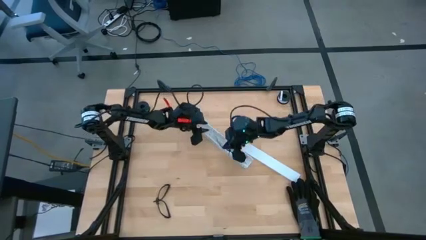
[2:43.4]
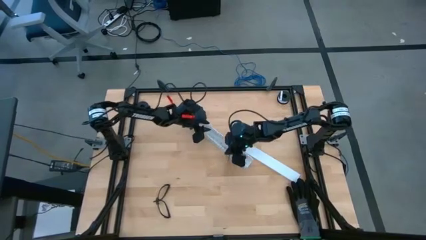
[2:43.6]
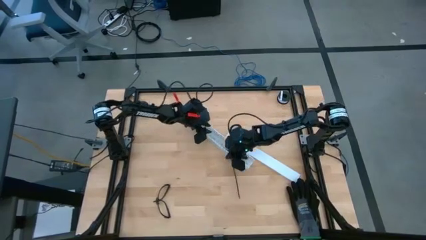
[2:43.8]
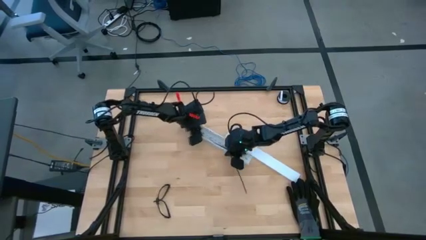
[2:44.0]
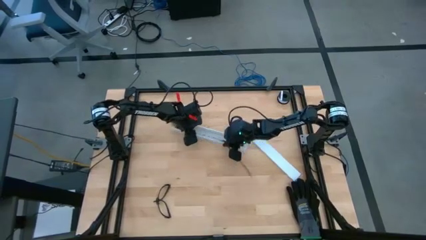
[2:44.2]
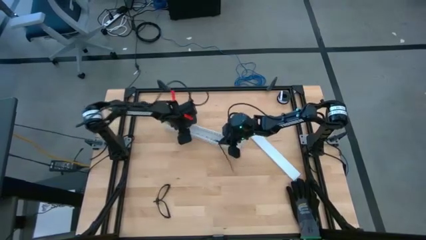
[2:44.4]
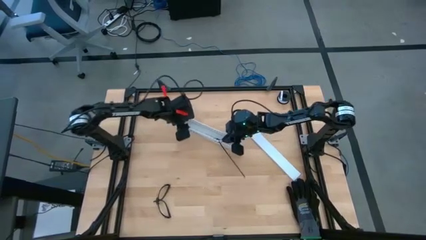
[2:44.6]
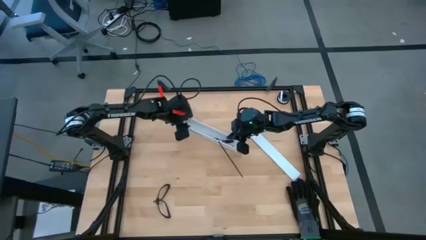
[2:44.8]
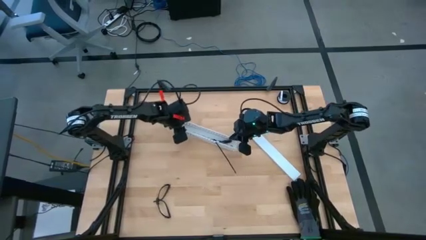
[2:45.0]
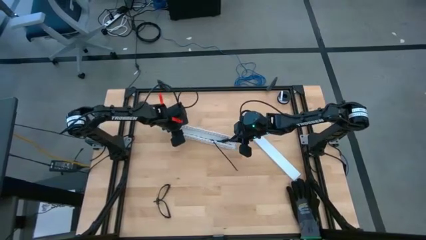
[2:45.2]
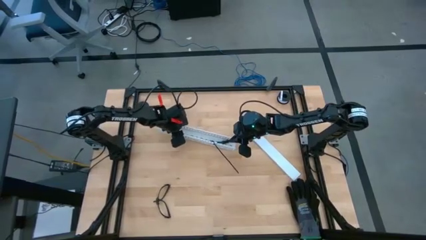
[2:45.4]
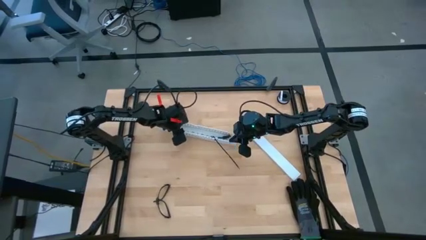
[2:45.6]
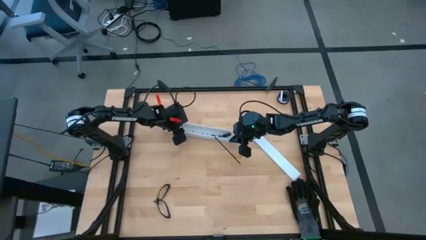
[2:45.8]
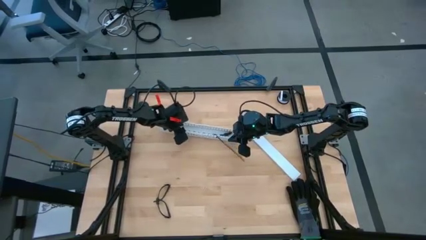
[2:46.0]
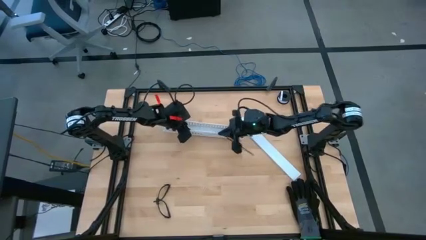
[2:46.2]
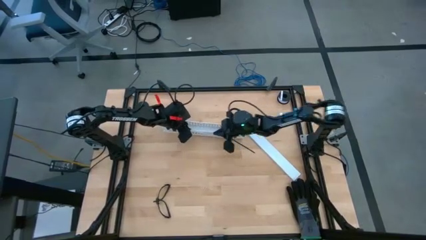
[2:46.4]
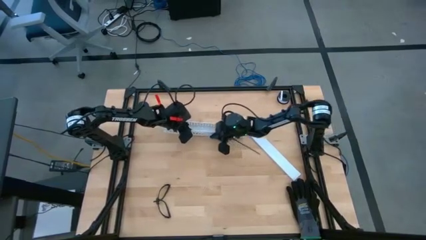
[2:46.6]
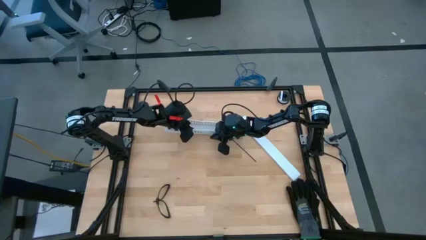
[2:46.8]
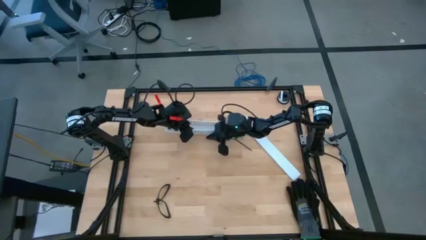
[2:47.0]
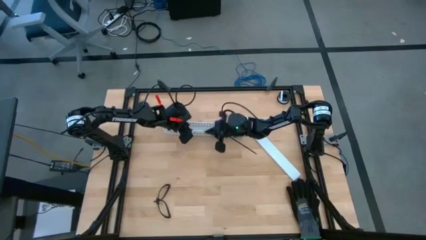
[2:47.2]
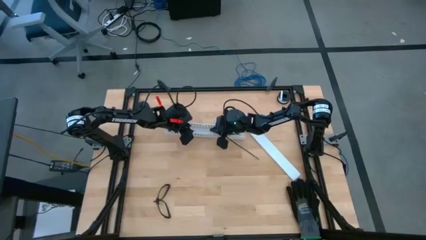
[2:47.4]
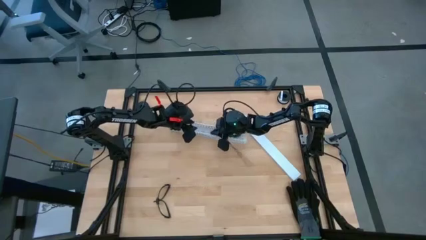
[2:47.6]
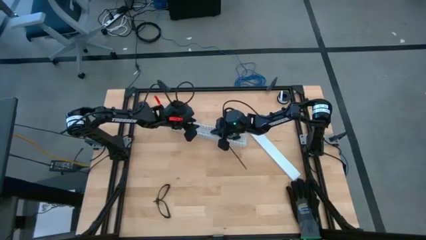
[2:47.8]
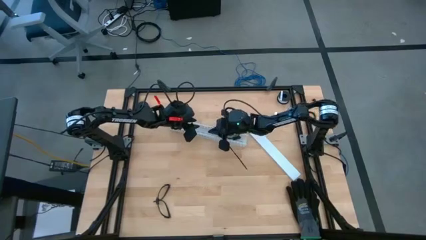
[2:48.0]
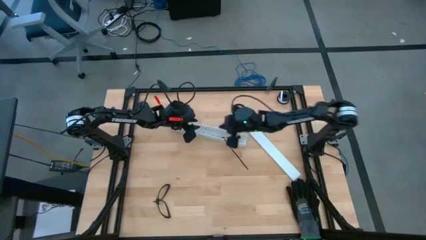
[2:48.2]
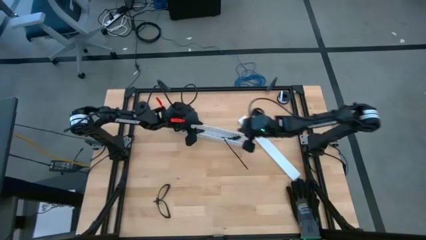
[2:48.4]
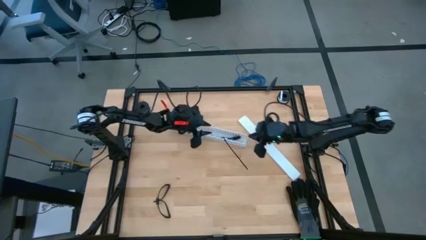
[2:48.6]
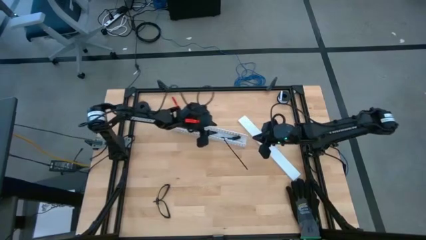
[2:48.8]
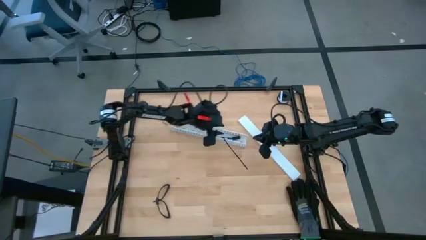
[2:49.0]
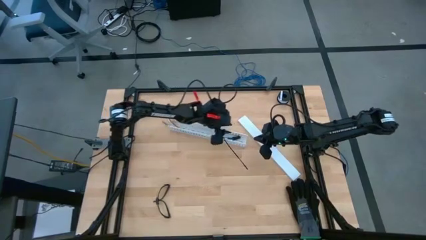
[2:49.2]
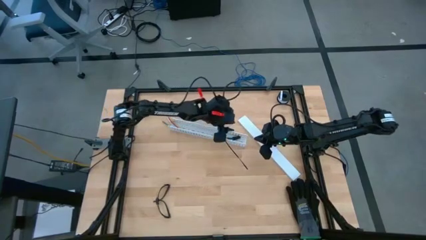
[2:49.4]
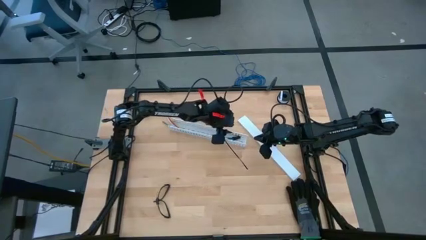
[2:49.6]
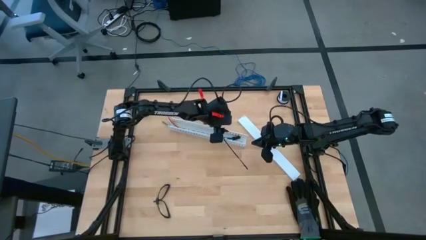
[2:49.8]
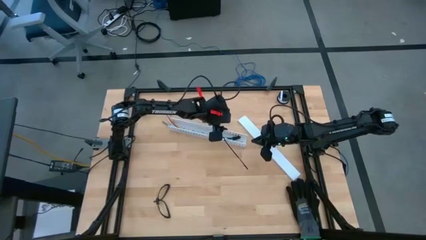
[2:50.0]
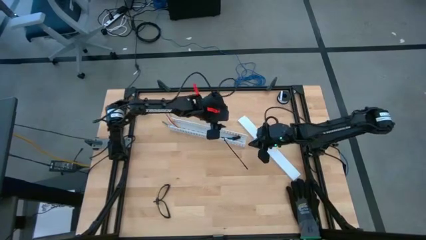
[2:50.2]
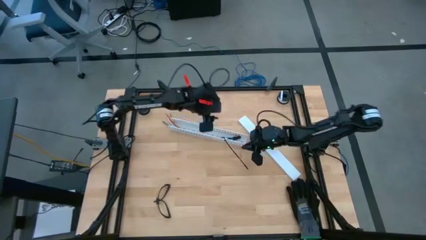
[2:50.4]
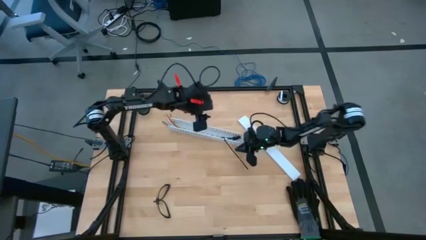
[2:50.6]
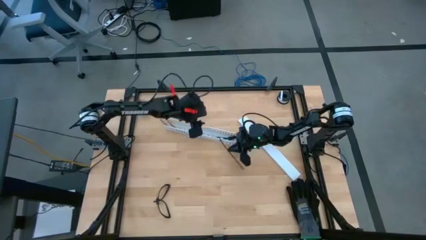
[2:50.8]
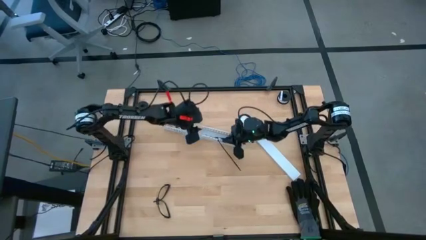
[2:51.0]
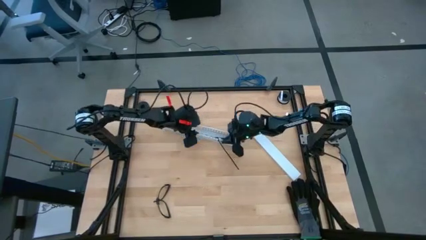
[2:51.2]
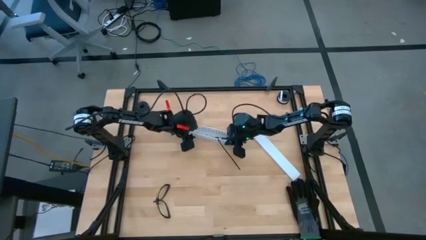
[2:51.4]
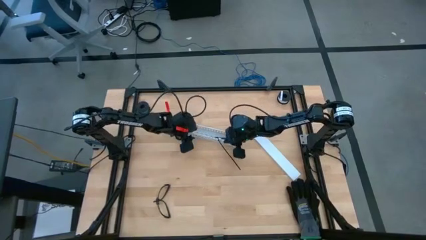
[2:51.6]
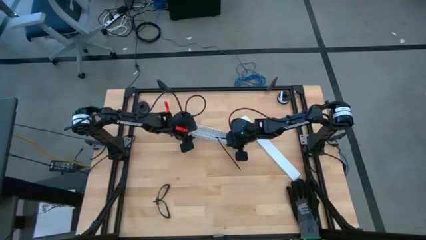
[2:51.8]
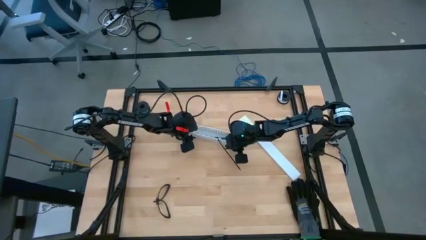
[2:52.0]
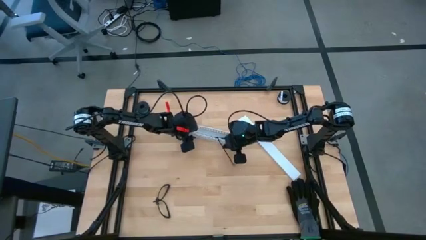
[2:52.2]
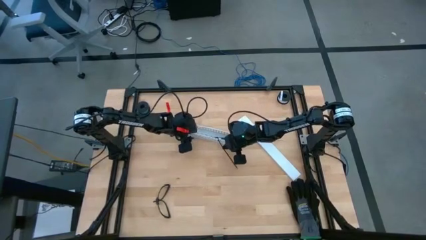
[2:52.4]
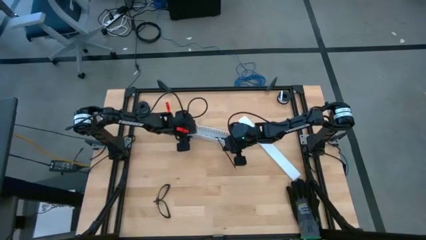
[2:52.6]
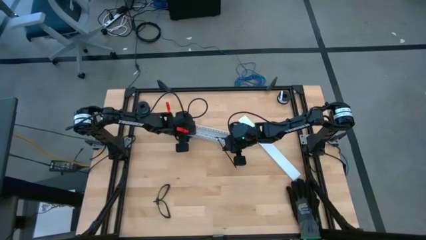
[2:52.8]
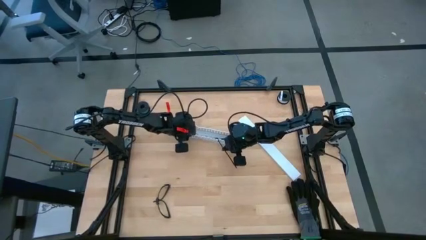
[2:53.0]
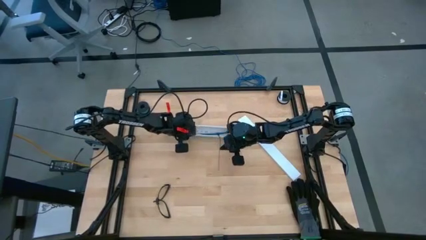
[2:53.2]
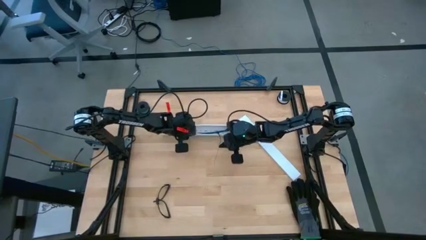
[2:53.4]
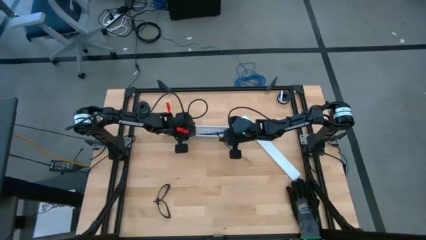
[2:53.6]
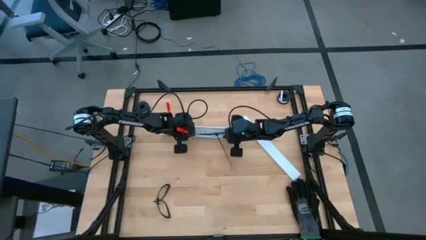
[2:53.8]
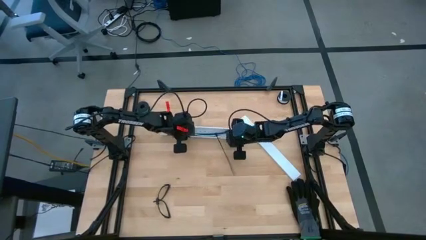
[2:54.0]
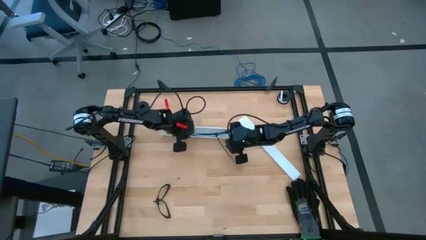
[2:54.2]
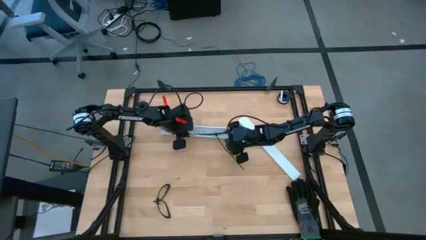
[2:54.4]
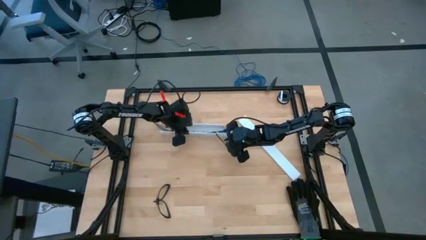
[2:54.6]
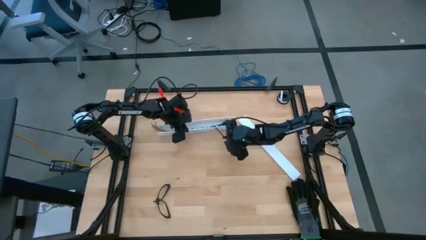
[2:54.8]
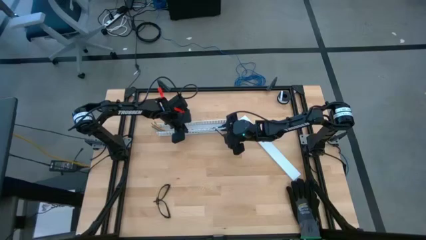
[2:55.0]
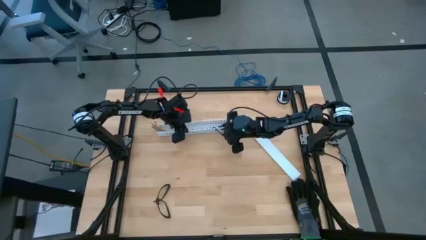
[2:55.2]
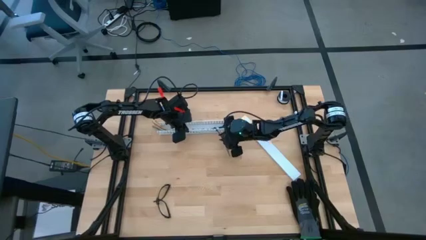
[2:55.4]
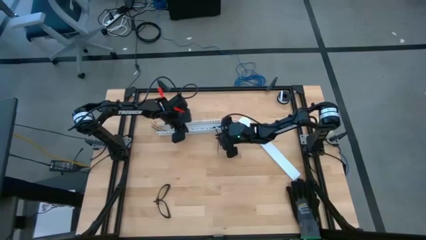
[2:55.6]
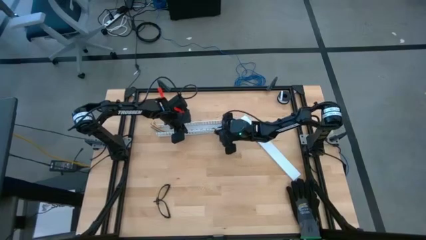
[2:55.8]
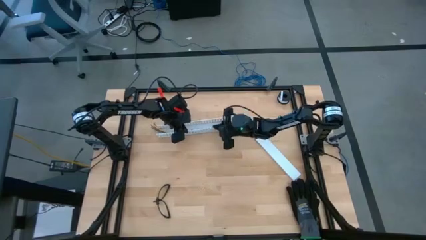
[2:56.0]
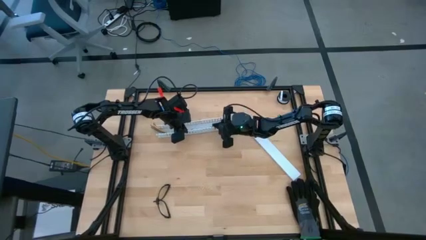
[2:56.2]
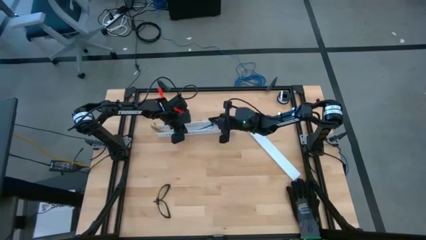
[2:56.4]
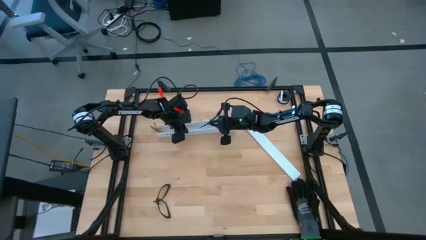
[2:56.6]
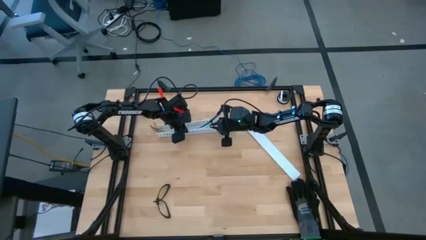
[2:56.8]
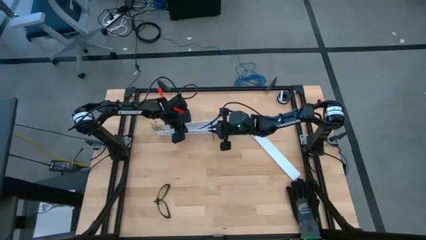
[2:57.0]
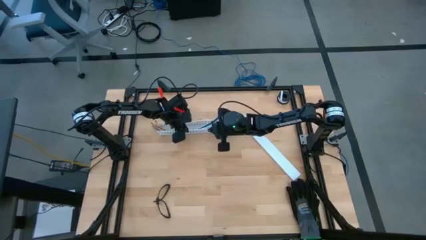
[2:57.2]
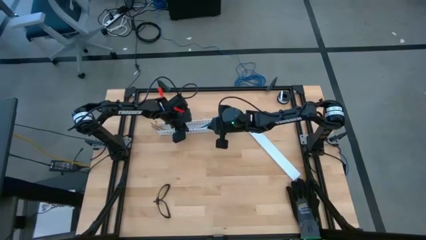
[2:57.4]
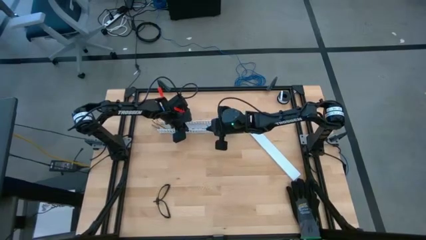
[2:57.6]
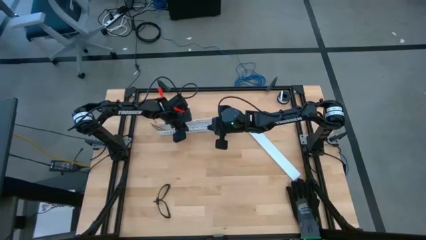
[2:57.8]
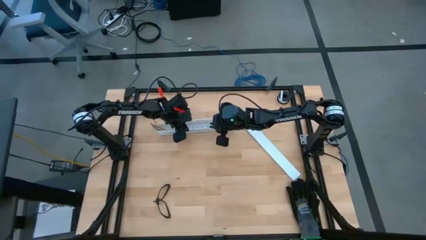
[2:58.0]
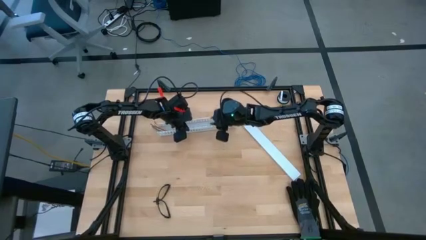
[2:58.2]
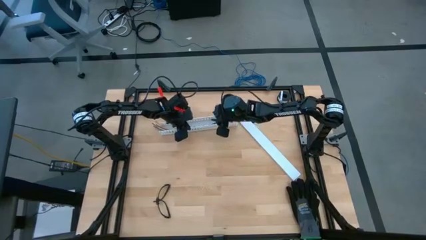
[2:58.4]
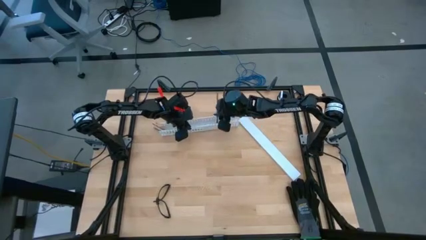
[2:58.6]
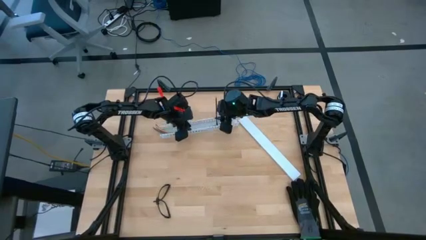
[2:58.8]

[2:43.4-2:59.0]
Task: Ziptie cables
Put the zip-tied cables in the white cable duct
